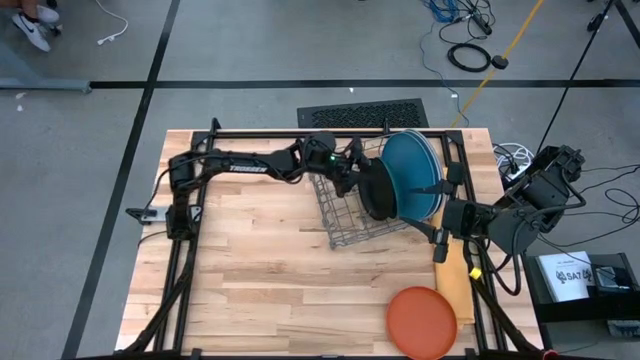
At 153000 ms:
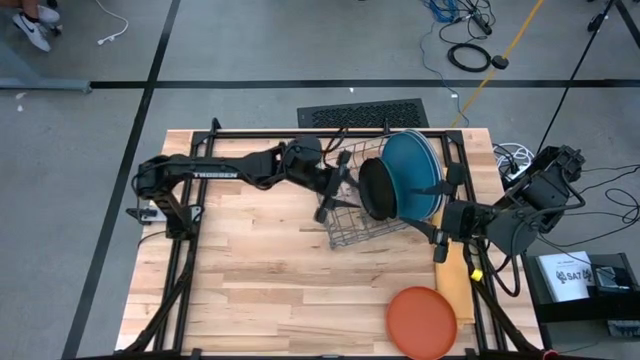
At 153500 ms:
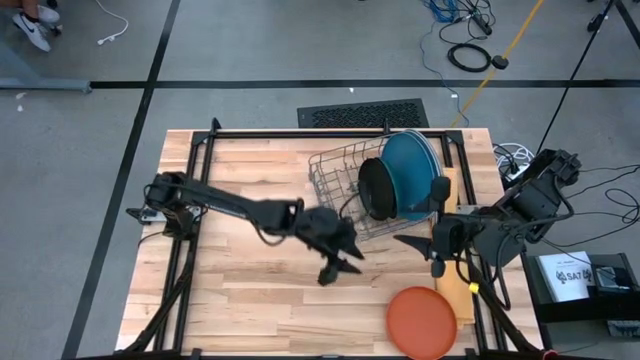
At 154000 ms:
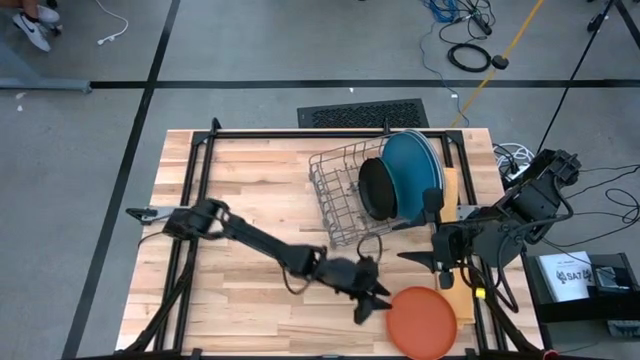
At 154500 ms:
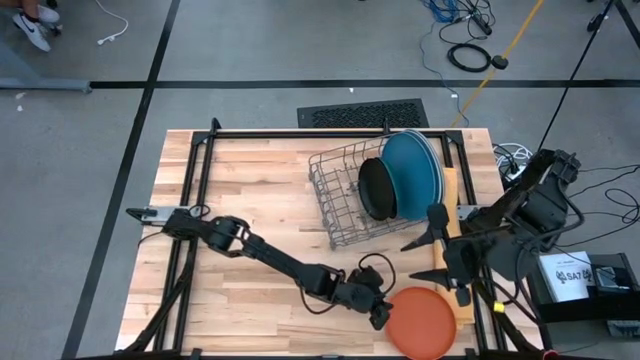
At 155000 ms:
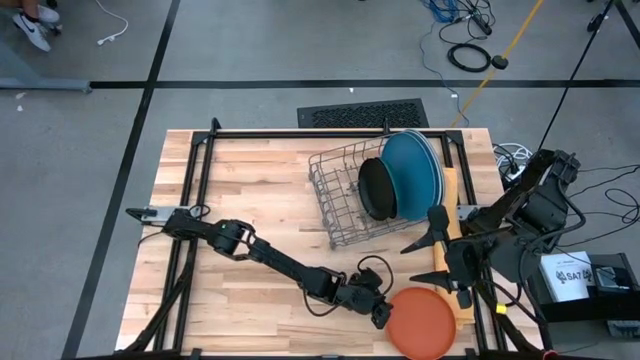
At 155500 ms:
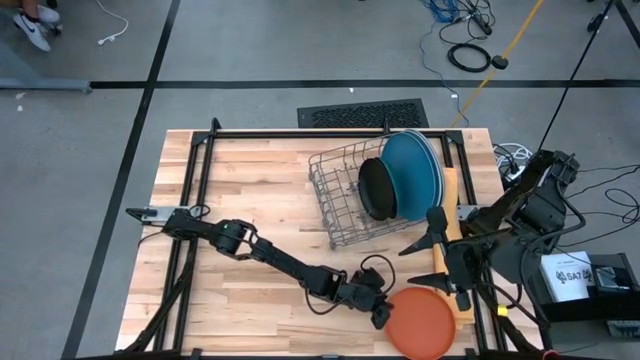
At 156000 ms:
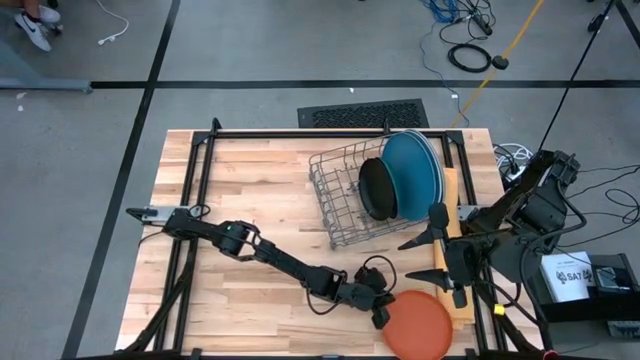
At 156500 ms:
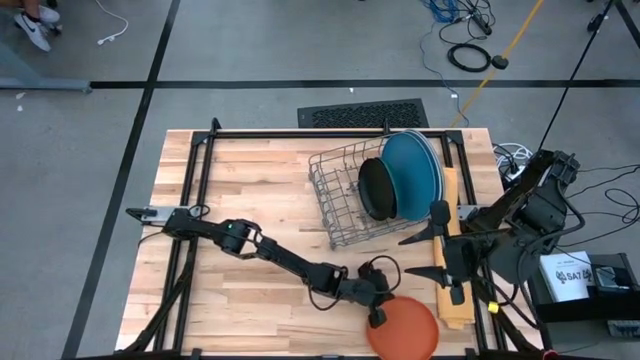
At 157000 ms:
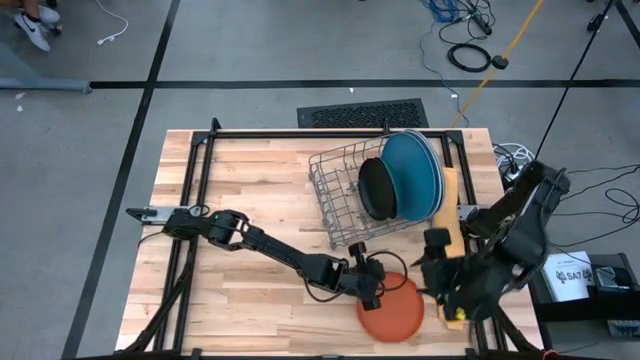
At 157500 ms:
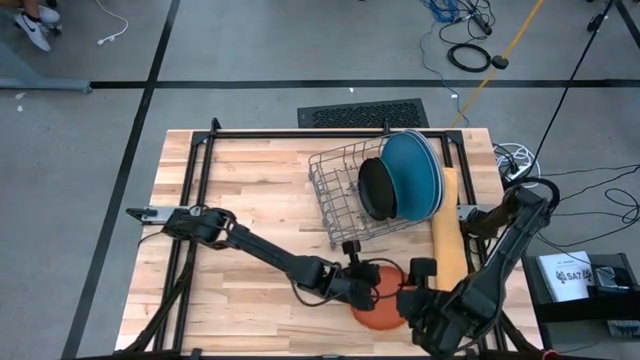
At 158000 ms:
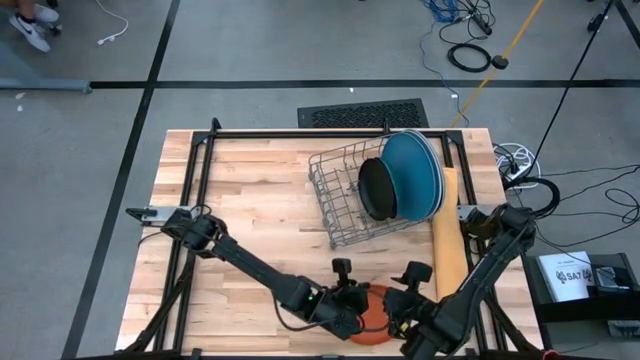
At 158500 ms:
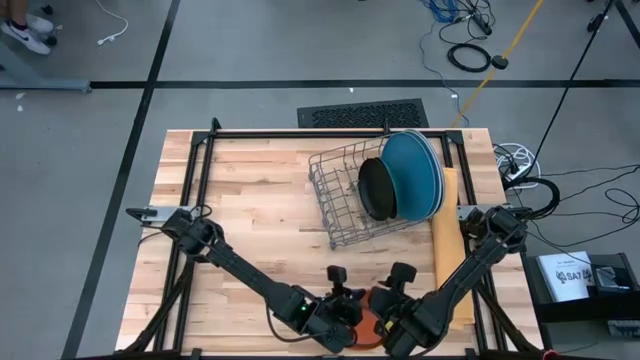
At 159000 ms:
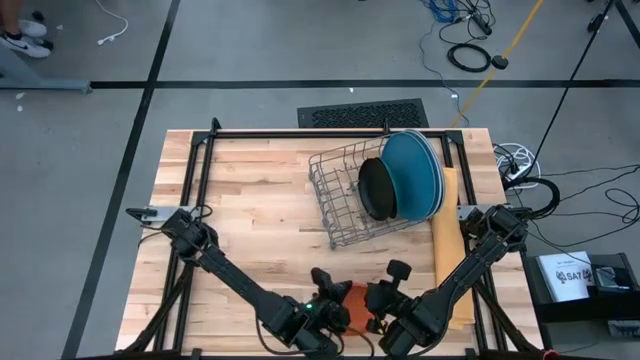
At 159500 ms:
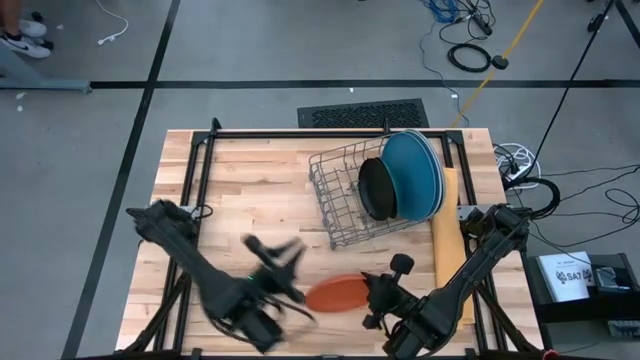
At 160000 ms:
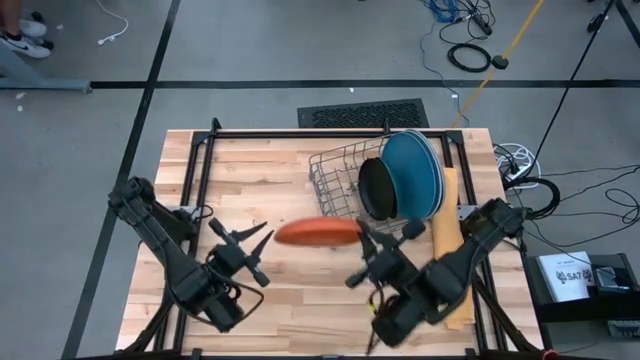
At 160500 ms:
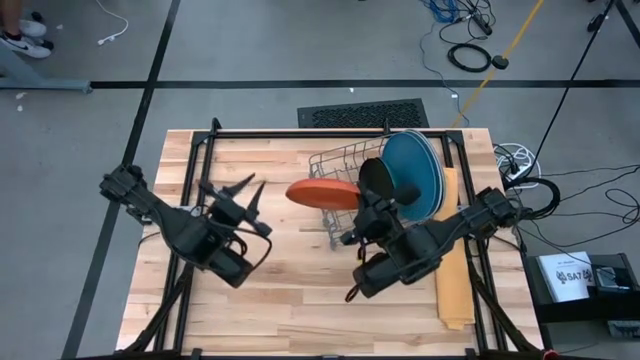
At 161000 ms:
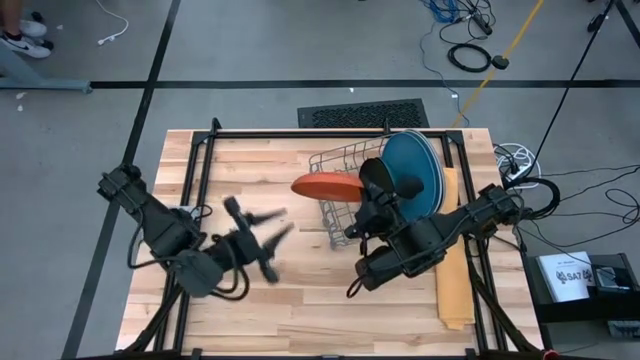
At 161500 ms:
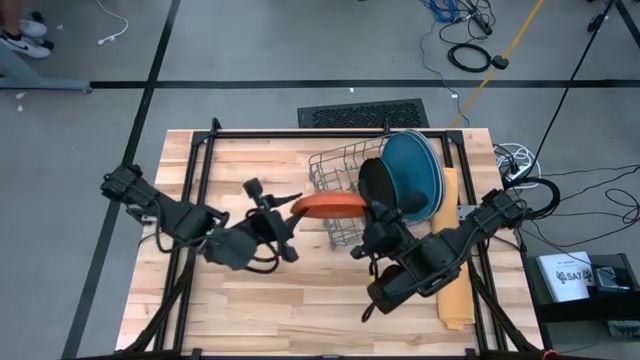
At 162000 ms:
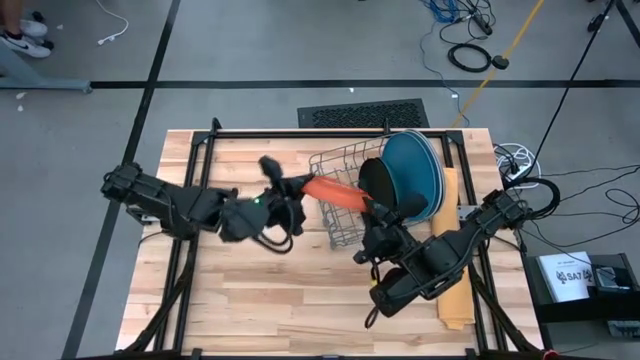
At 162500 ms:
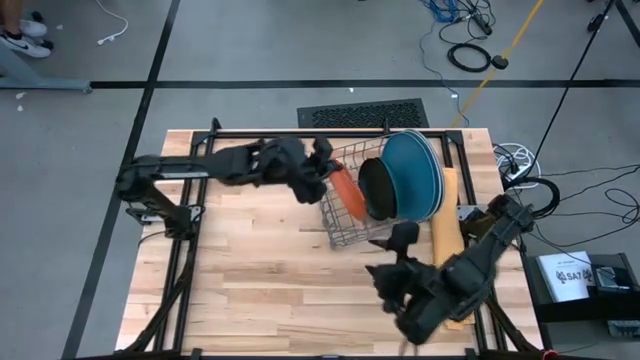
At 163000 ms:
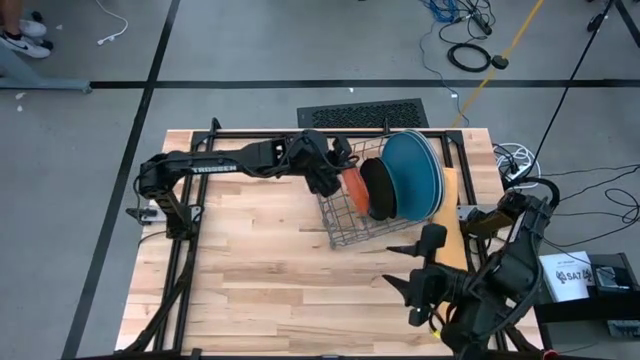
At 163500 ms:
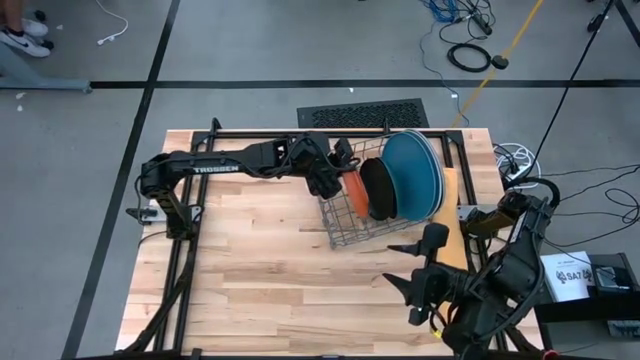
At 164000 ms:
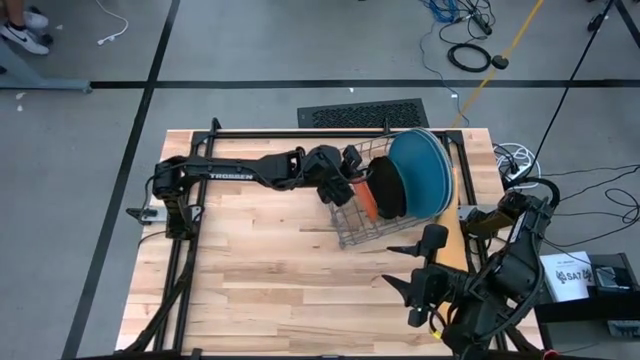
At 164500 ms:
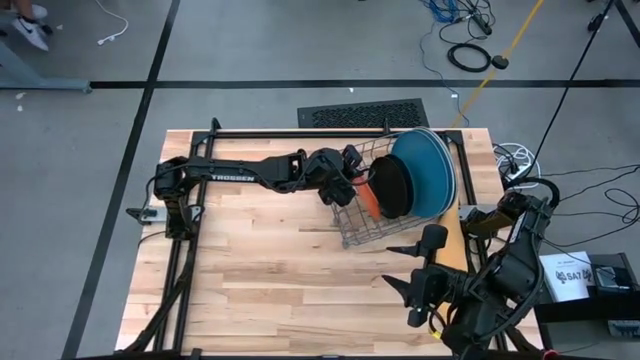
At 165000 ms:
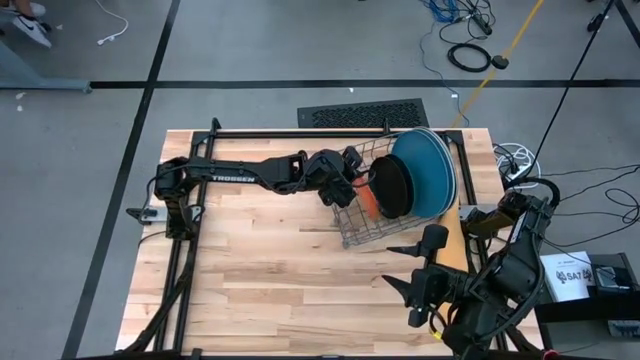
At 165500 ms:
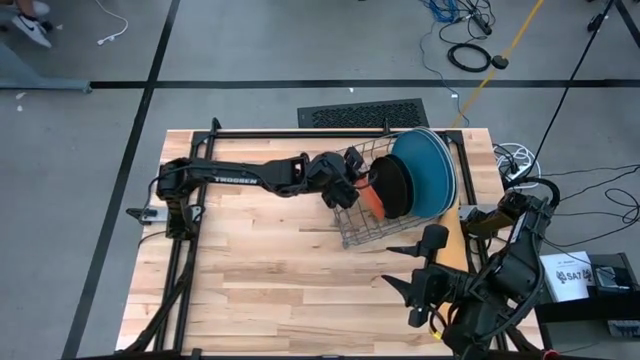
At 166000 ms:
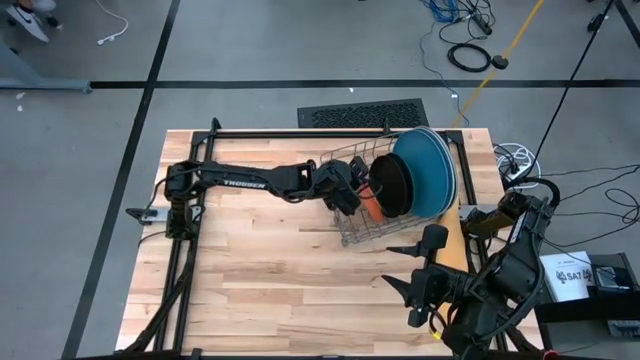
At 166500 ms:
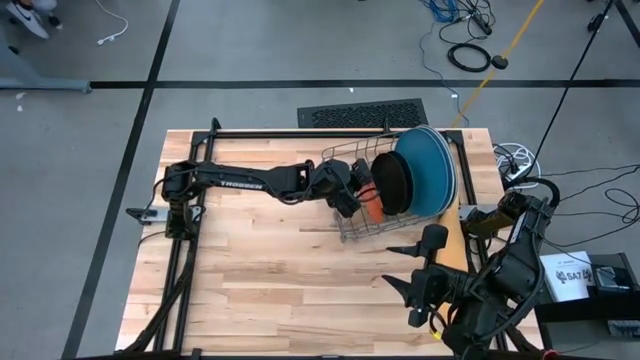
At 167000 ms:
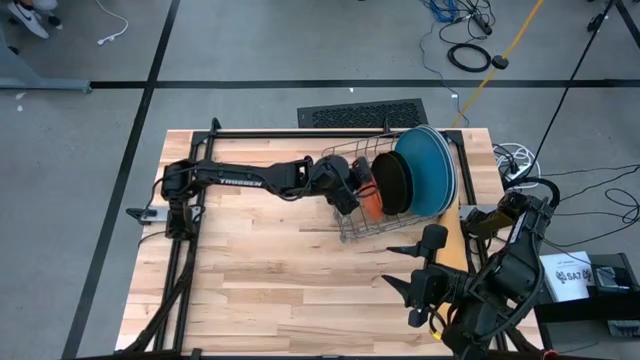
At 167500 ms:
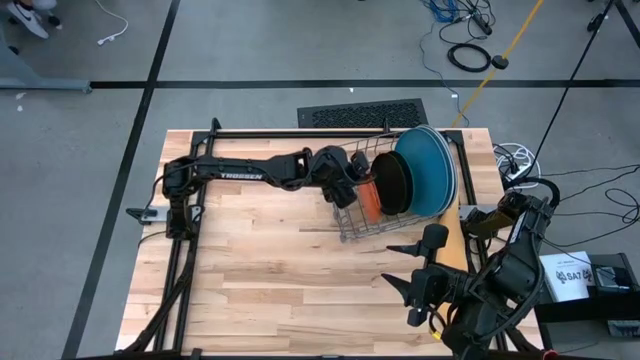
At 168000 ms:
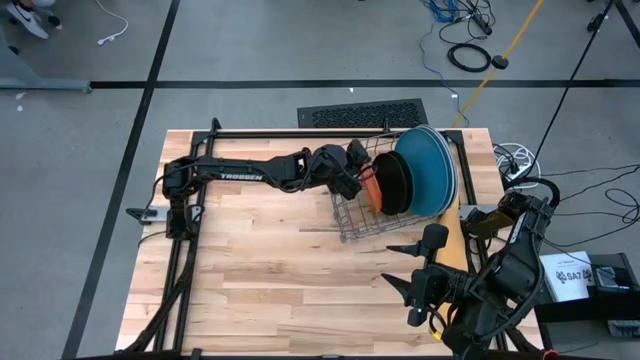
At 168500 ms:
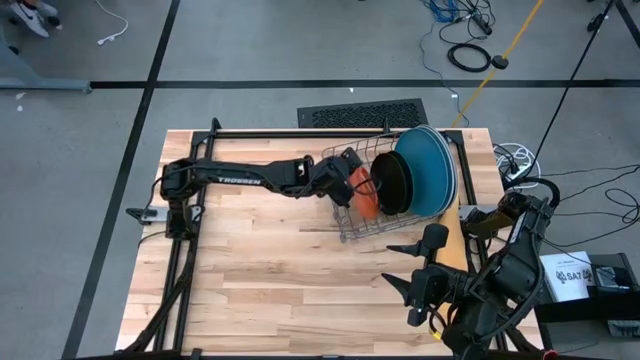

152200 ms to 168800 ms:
Task: Sort dishes
Put the orange plate into the dish rack

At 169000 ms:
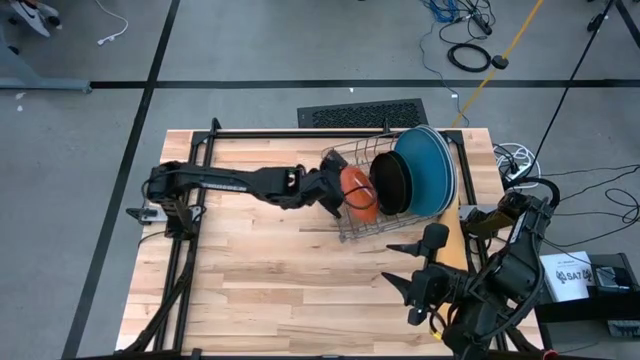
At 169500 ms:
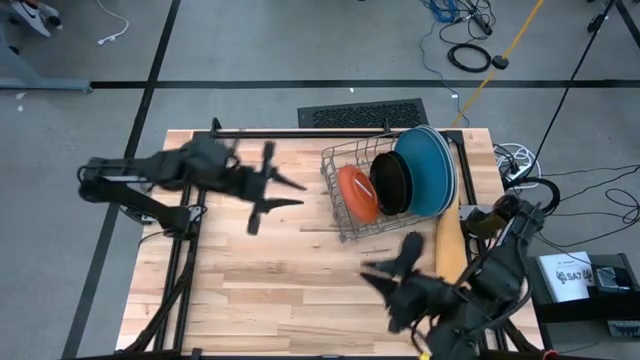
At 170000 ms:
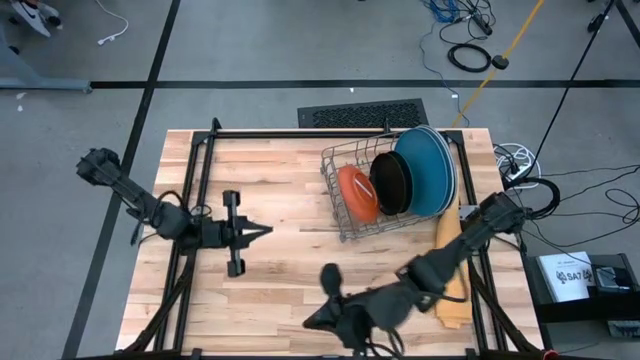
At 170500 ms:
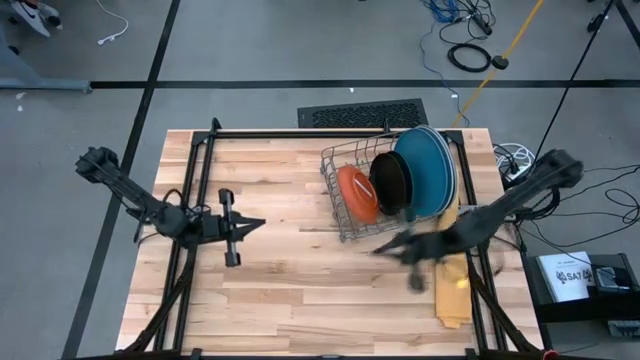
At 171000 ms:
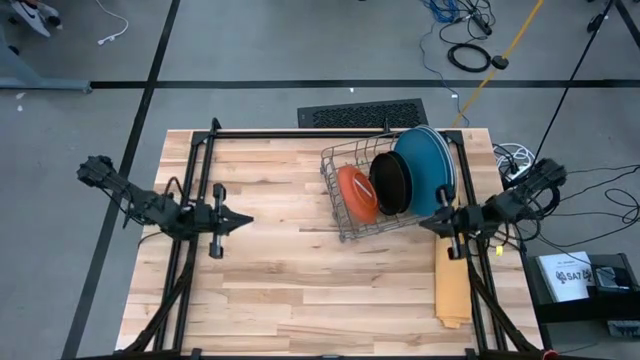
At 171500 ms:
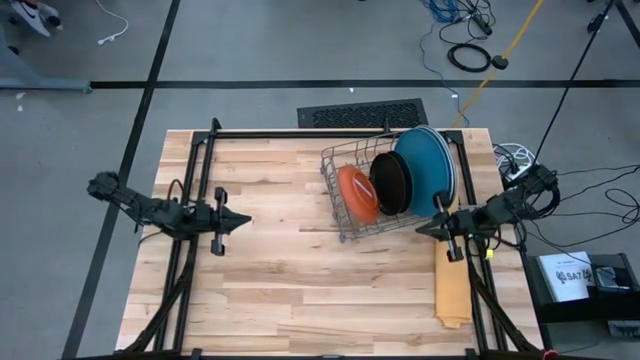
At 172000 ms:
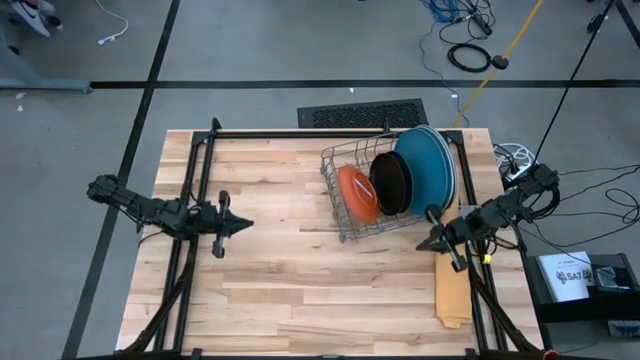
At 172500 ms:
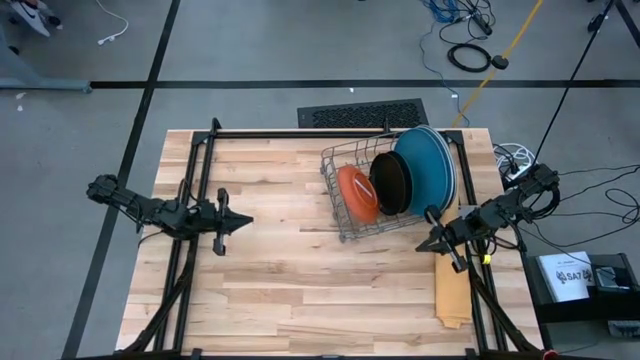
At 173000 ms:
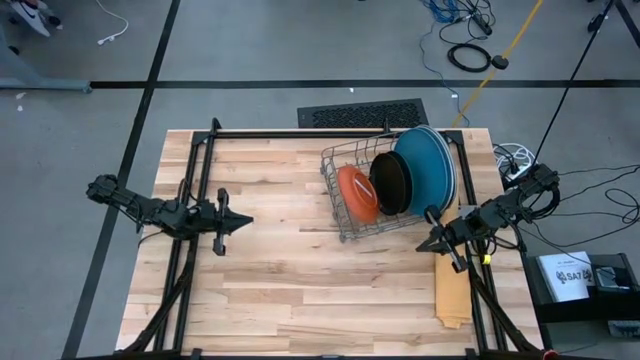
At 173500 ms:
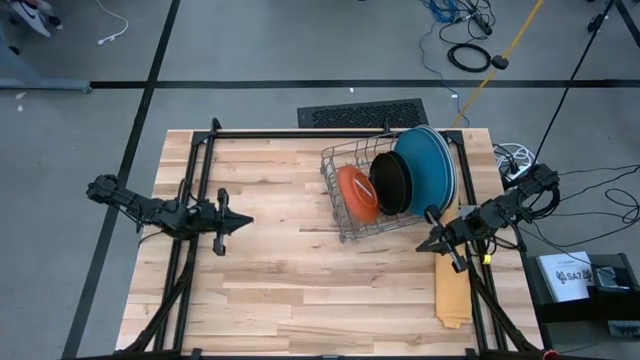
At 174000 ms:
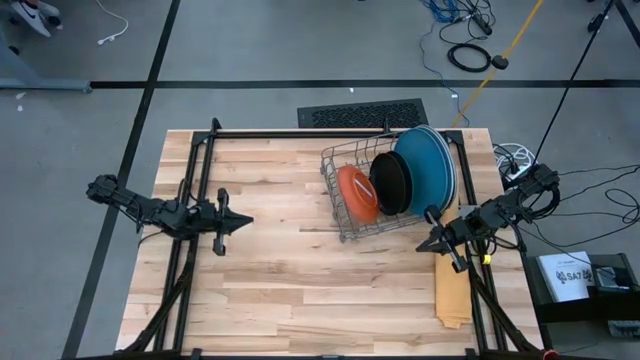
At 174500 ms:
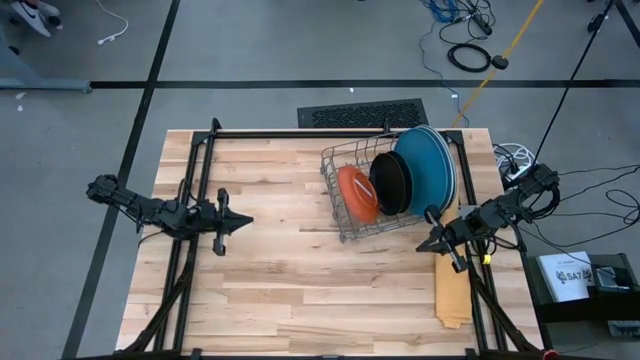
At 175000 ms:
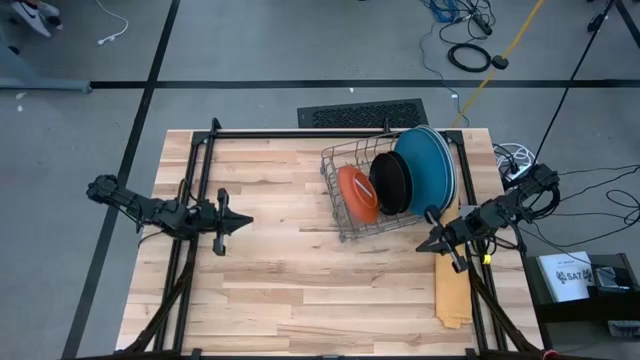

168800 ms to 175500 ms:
Return to Home Position
